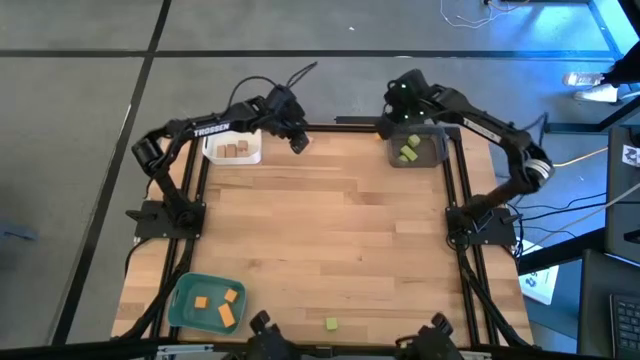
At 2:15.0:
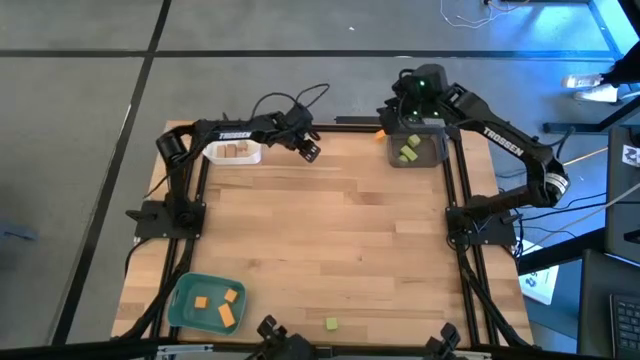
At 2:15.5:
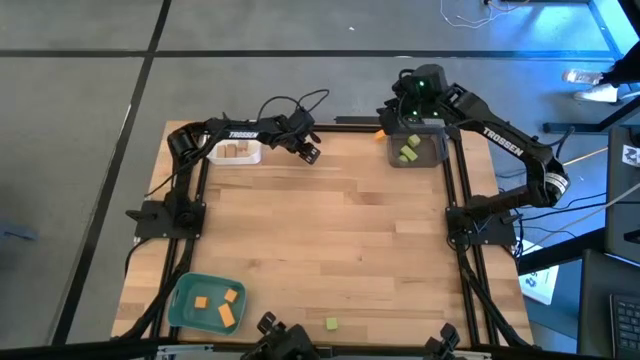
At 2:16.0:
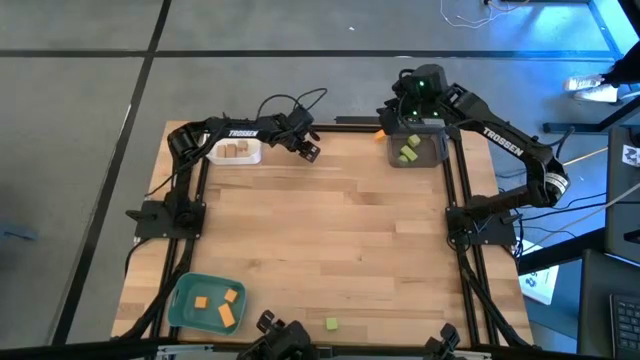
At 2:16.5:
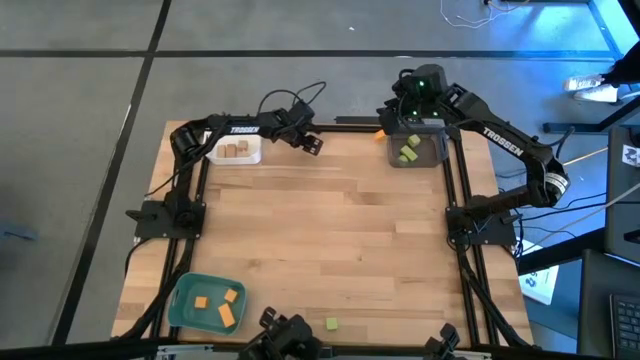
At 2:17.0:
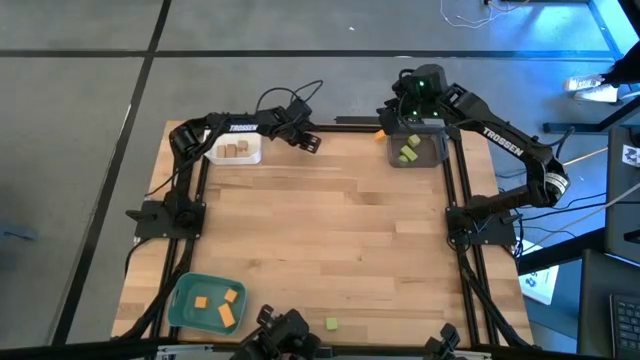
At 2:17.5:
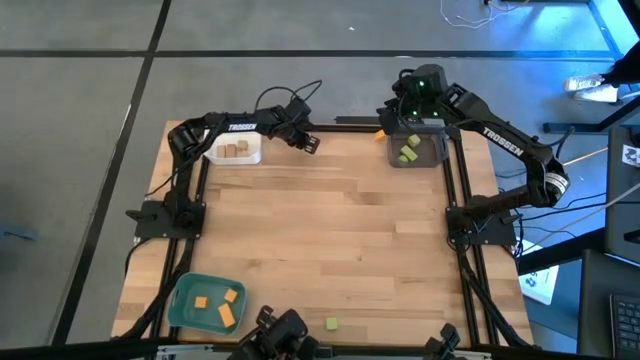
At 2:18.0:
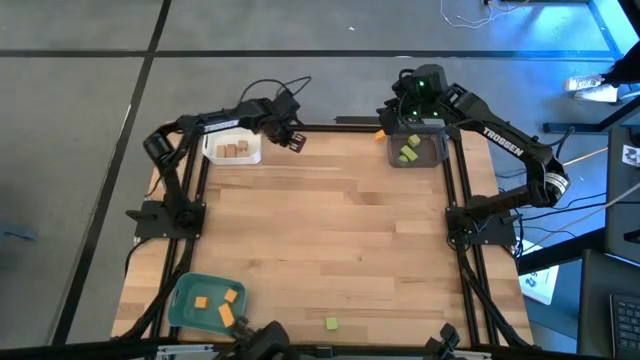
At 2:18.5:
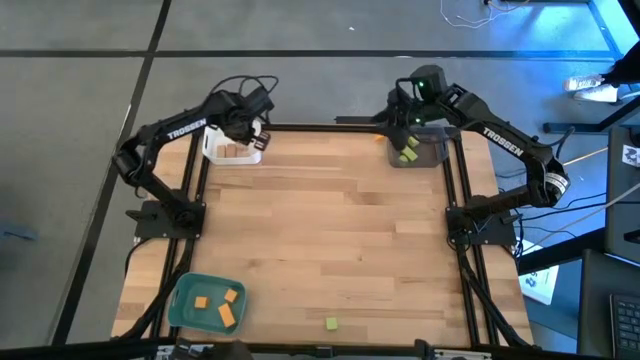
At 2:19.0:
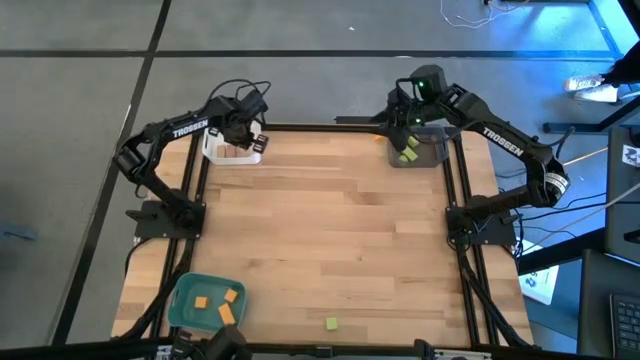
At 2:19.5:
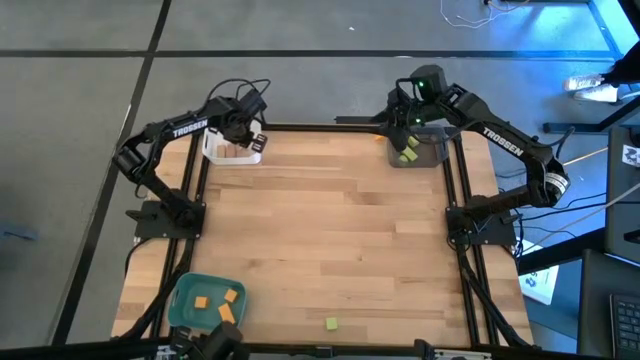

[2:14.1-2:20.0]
Task: Sort & place blocks by color
Put the brown block into the white bin

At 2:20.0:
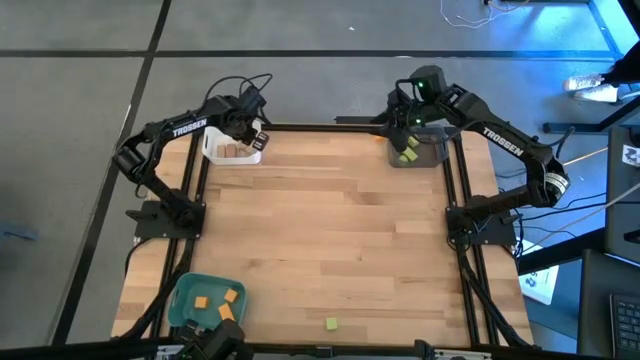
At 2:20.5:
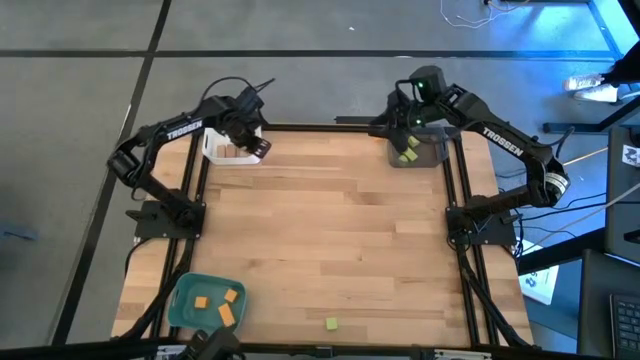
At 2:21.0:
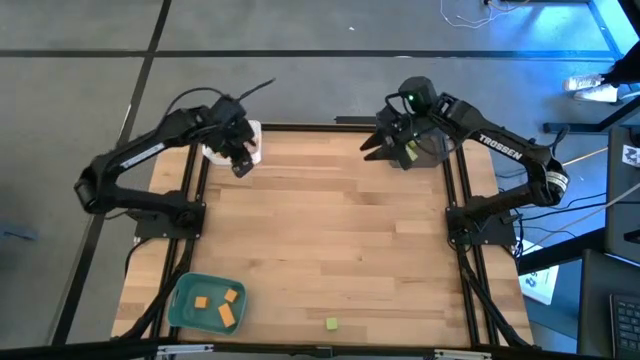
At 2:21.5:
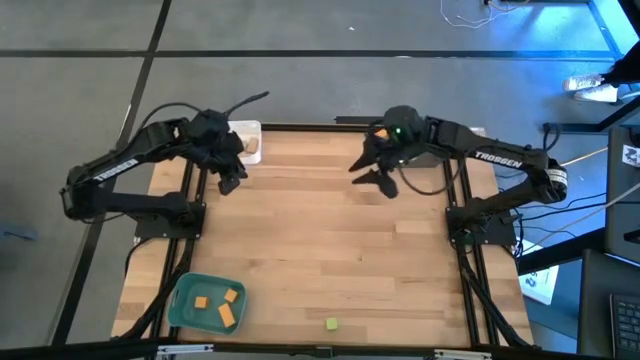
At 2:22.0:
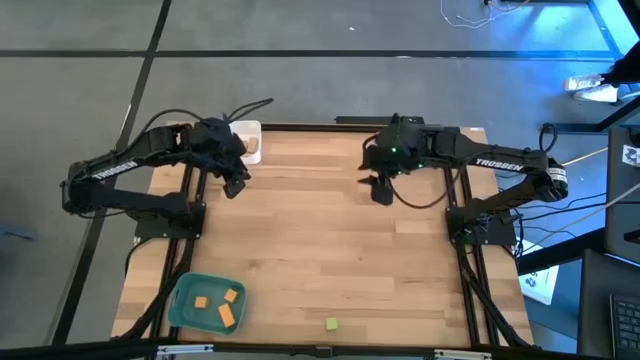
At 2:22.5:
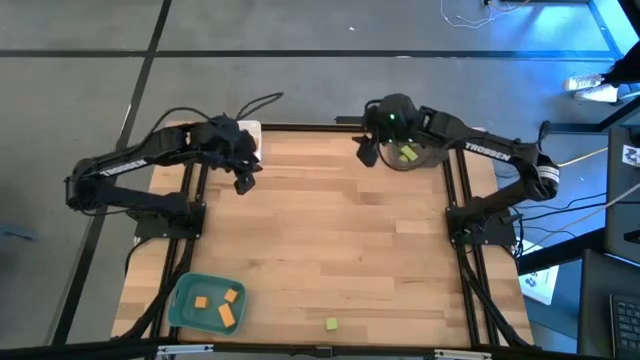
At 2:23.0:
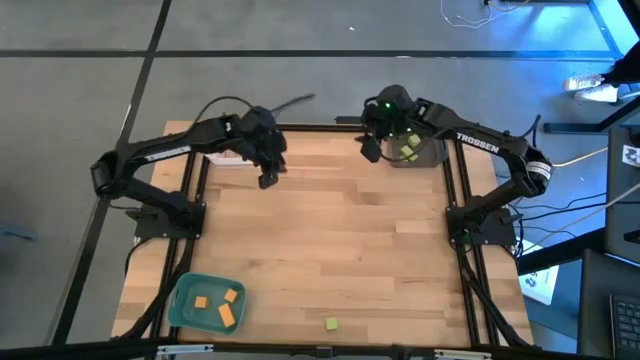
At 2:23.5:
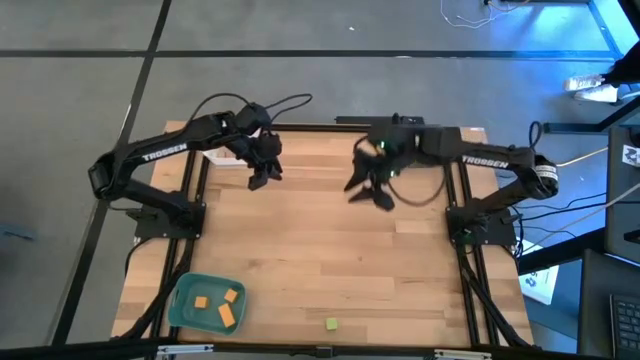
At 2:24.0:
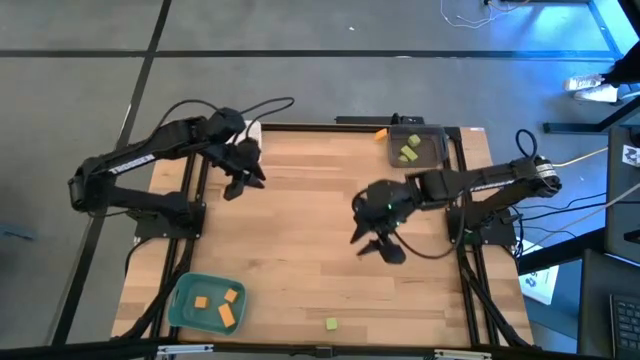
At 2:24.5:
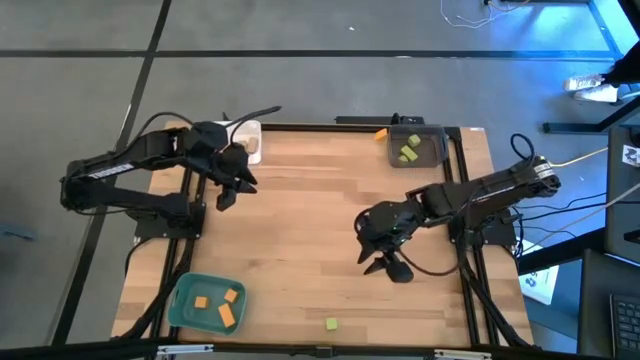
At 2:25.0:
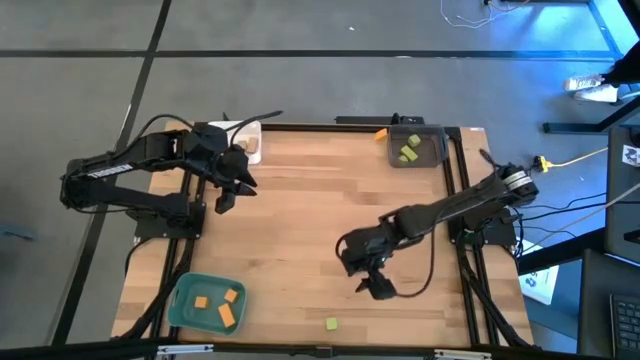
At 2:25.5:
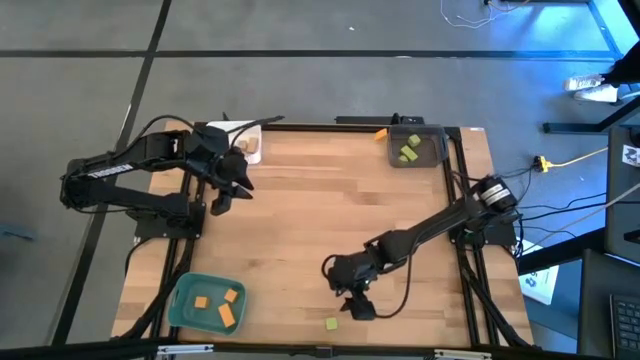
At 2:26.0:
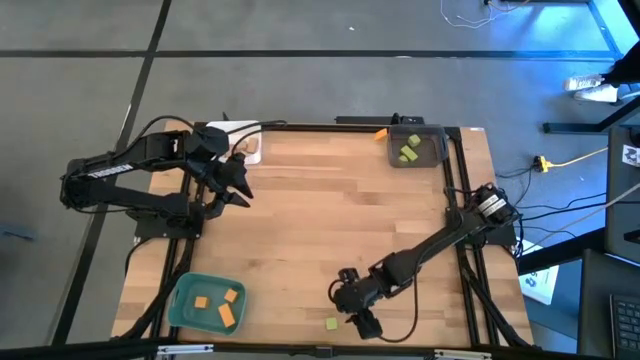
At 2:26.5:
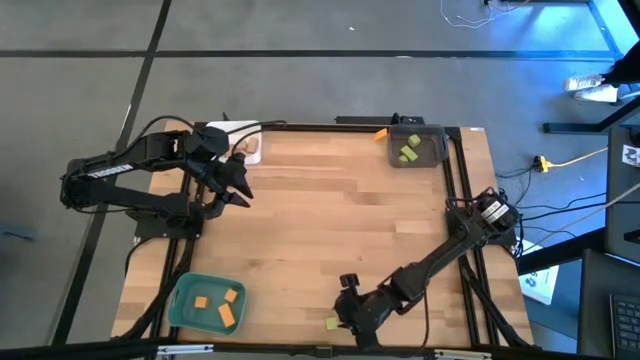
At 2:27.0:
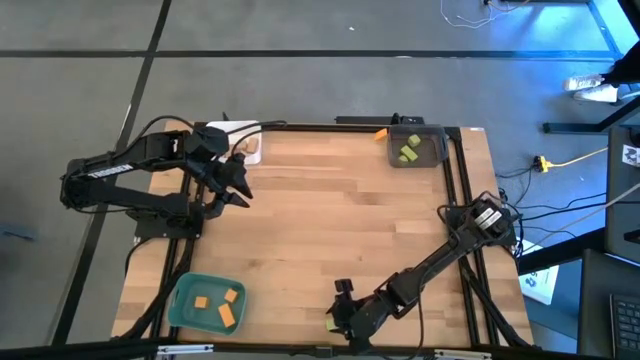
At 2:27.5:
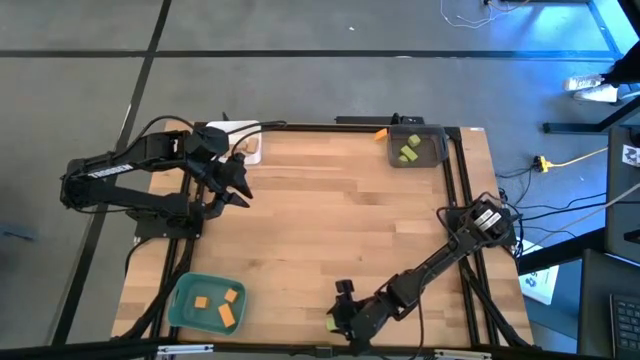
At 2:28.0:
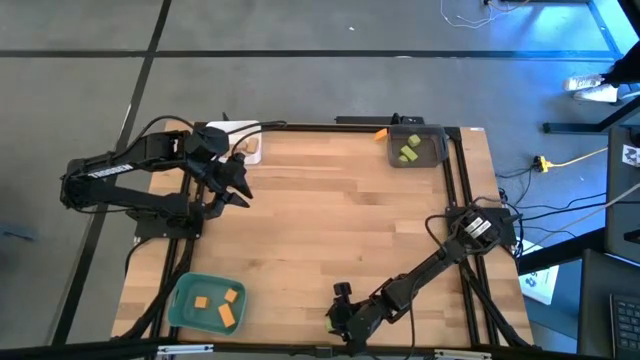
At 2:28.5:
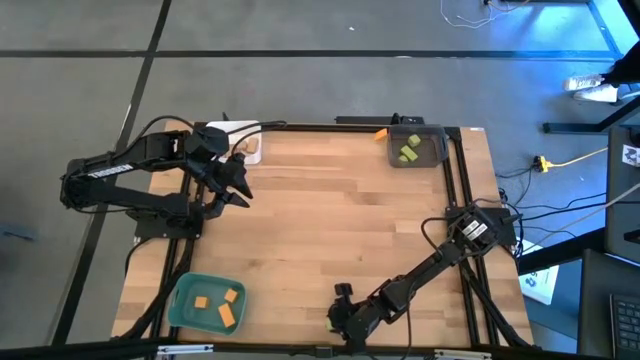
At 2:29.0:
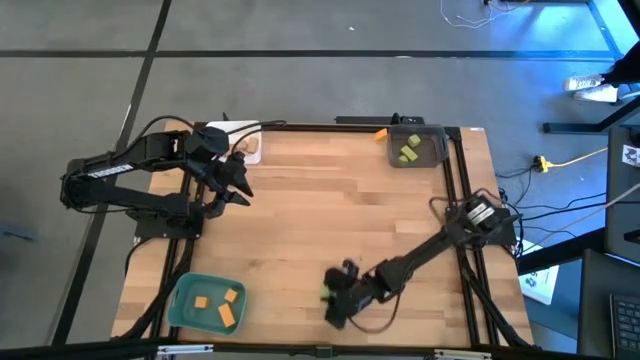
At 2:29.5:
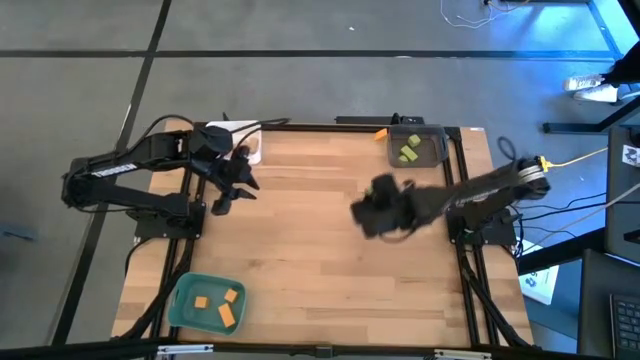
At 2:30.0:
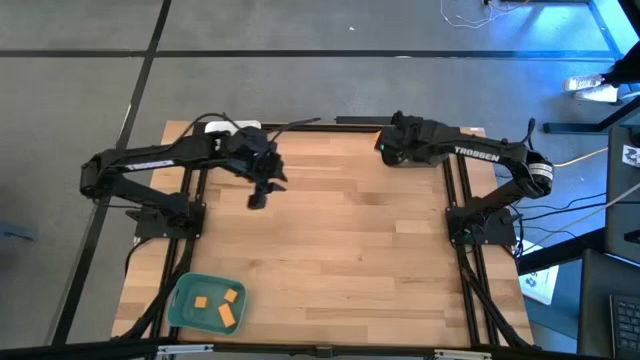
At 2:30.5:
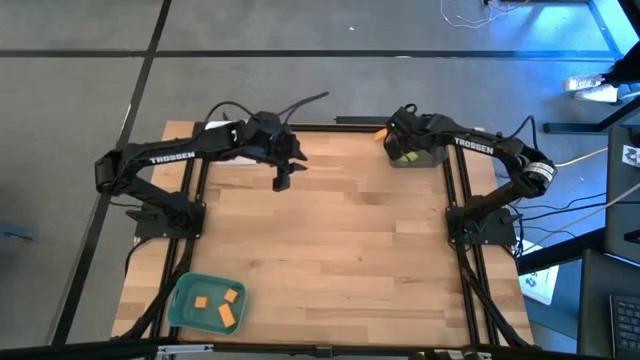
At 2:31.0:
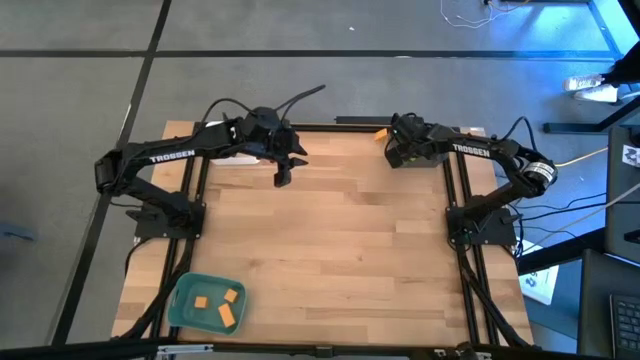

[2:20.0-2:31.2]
Put the green block into the black bin

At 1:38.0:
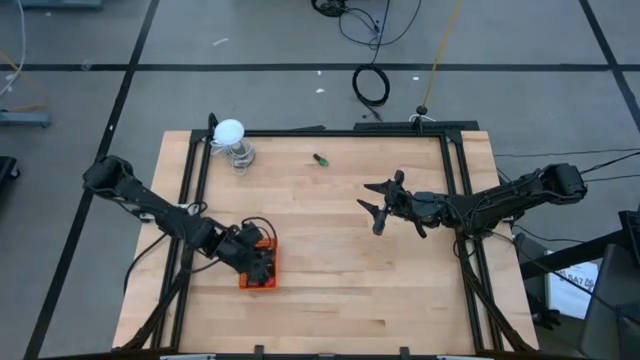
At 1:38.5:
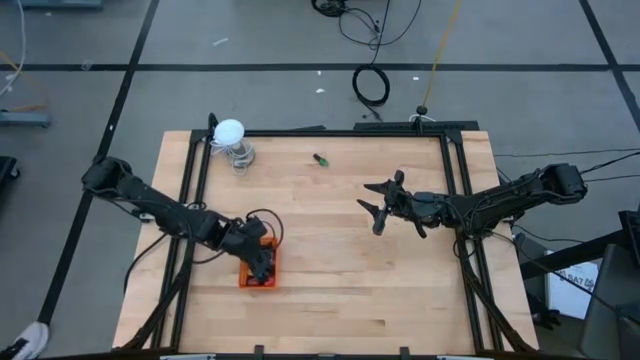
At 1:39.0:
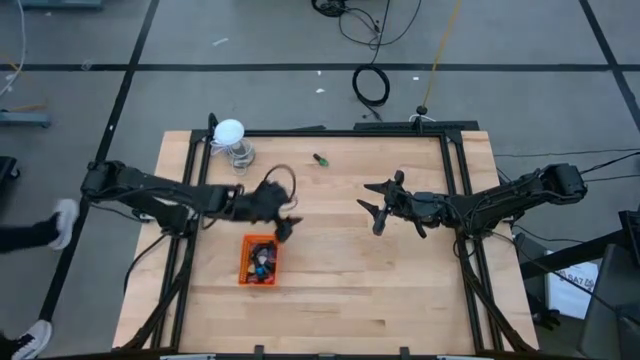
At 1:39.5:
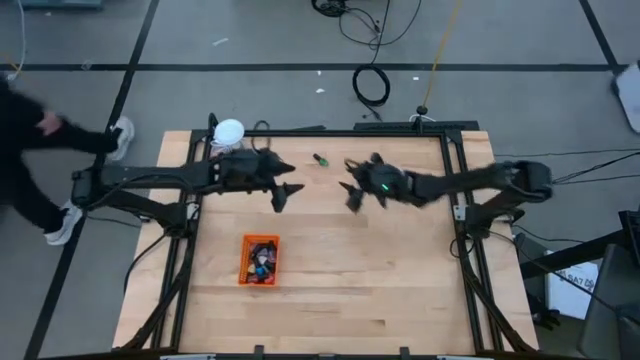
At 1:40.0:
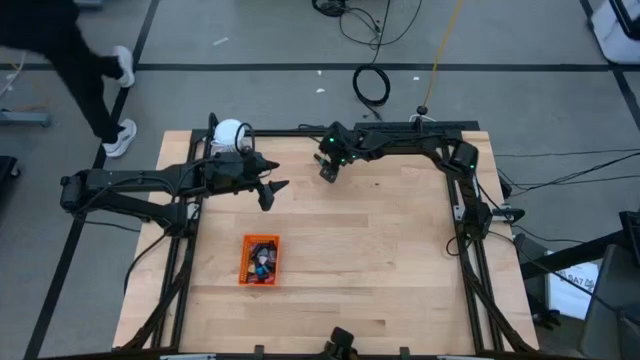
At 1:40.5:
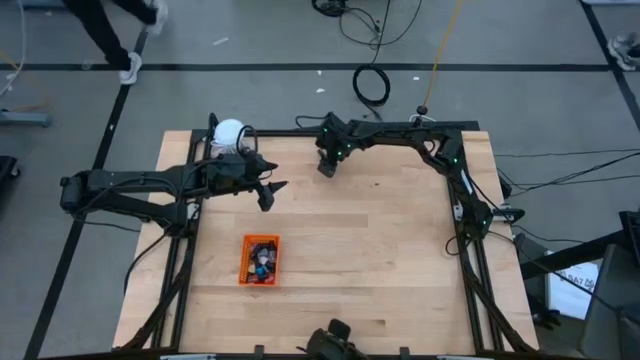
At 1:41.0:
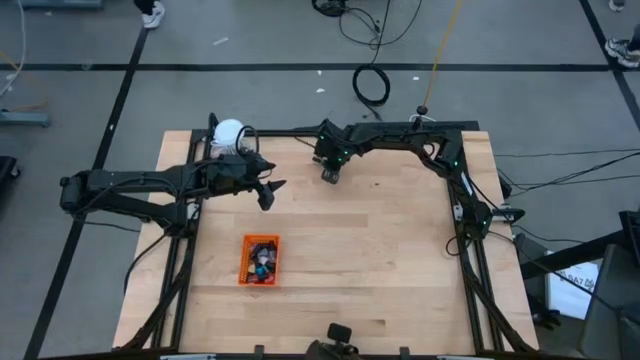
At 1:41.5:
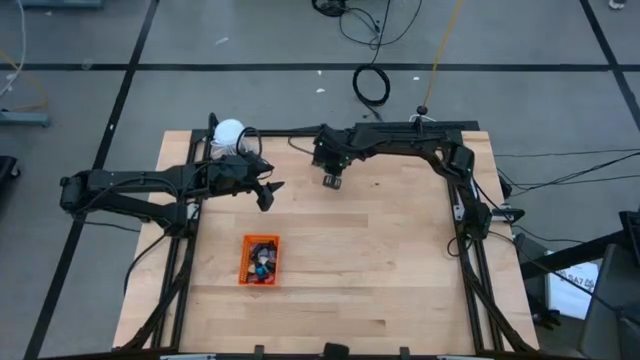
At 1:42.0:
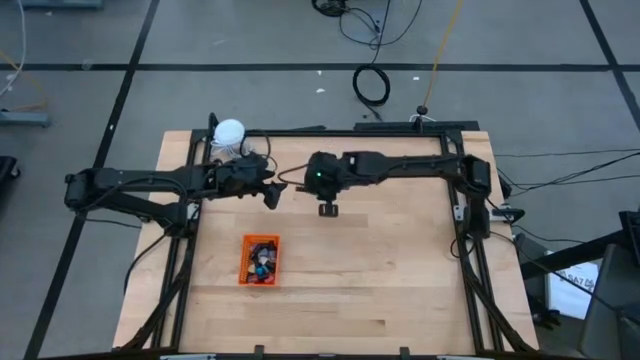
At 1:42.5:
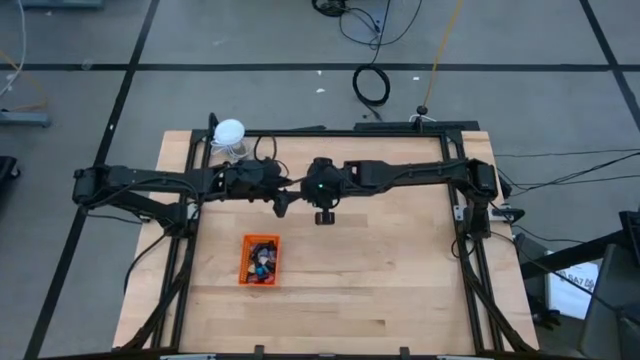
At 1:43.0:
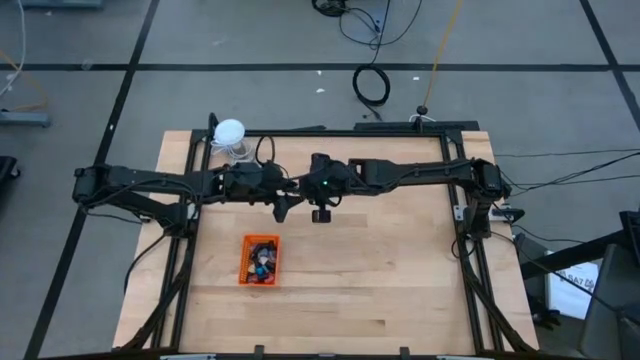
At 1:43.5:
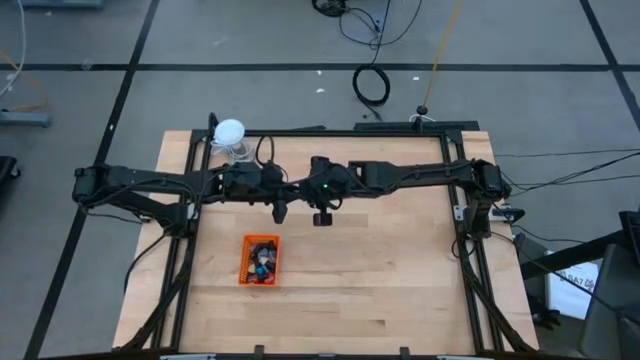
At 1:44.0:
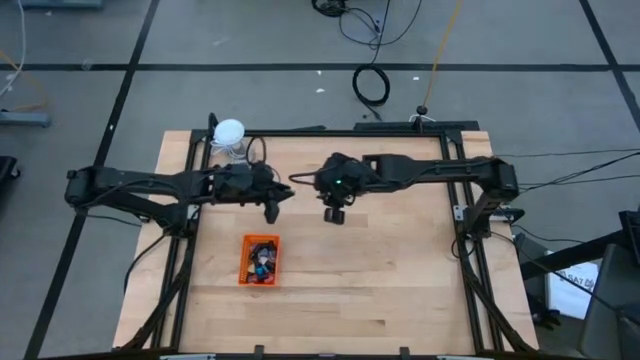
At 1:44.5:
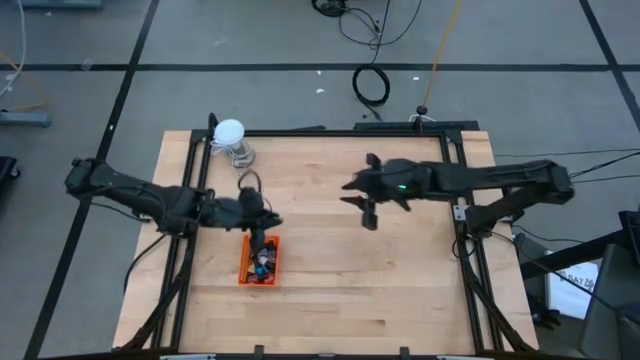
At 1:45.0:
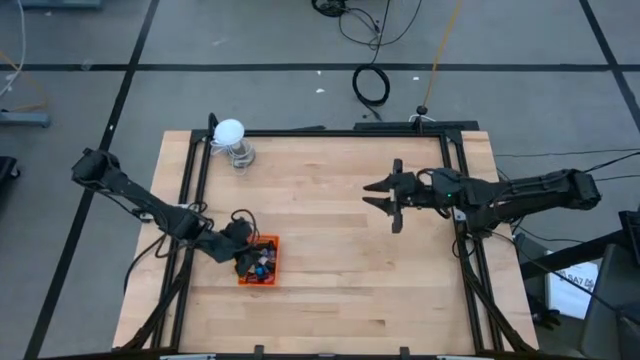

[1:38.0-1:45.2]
Task: Pick & Place Nail Polish
Put the green nail color bottle into the orange bin
